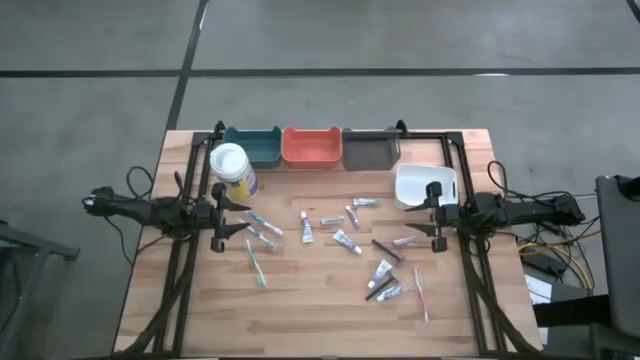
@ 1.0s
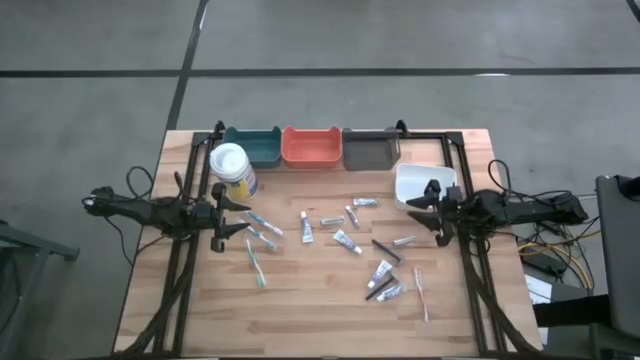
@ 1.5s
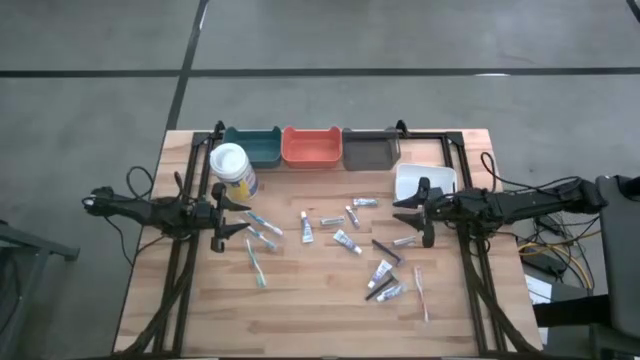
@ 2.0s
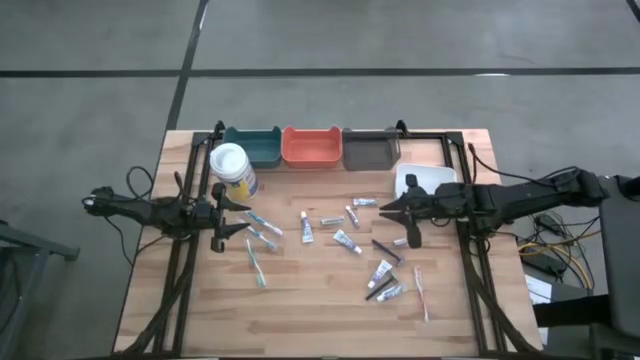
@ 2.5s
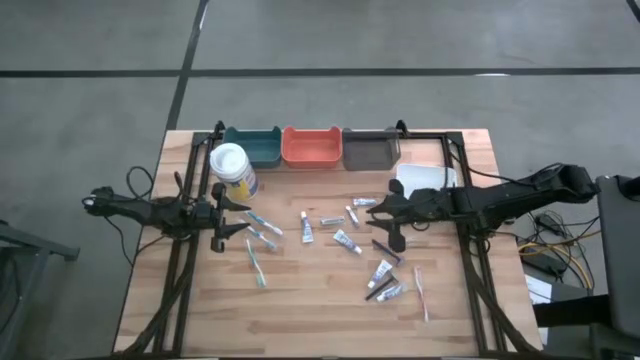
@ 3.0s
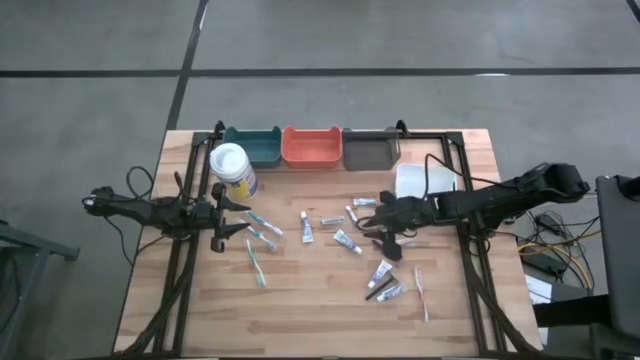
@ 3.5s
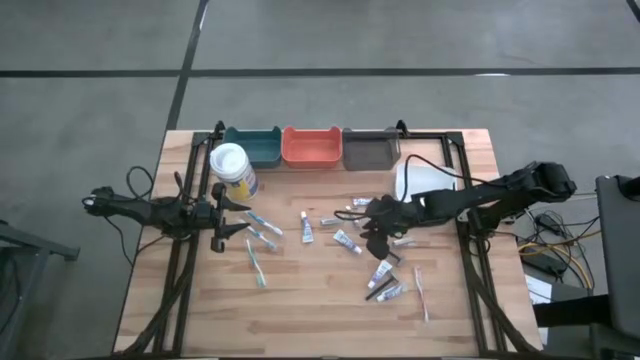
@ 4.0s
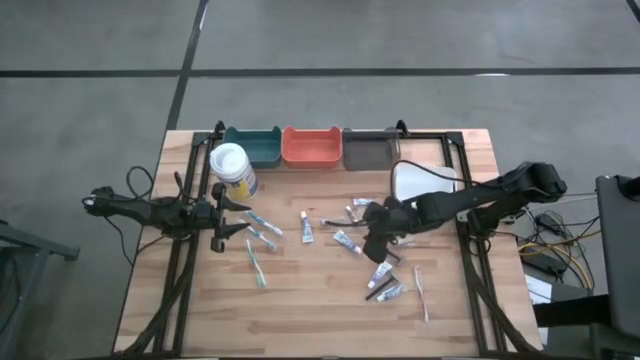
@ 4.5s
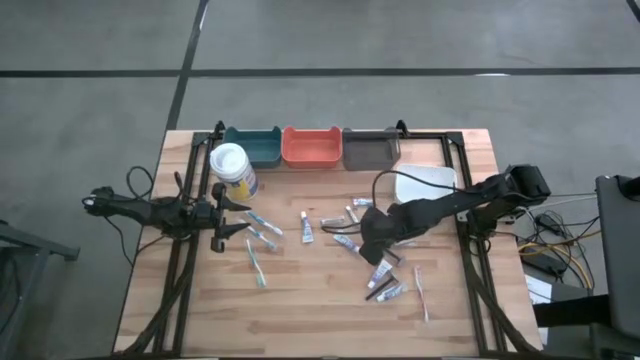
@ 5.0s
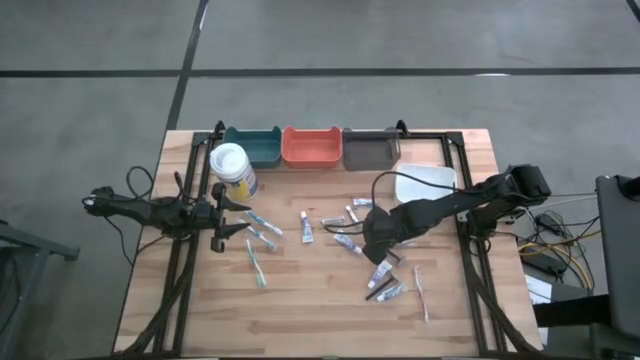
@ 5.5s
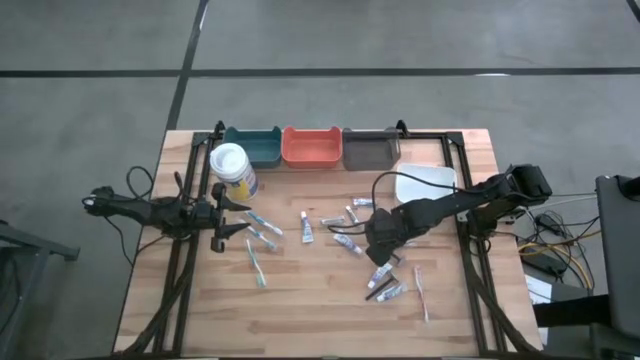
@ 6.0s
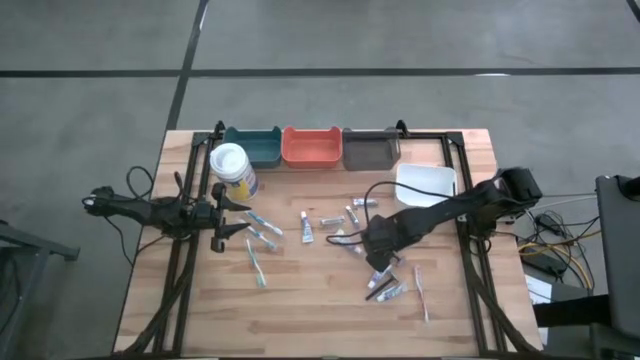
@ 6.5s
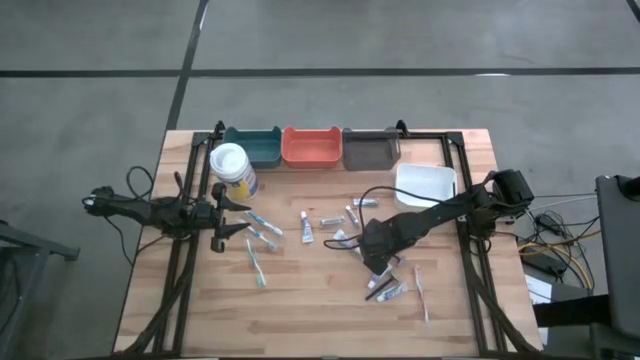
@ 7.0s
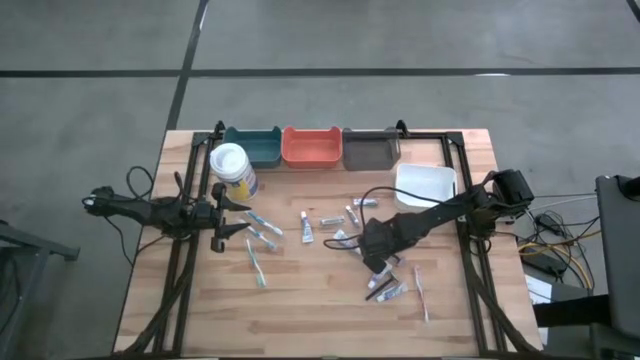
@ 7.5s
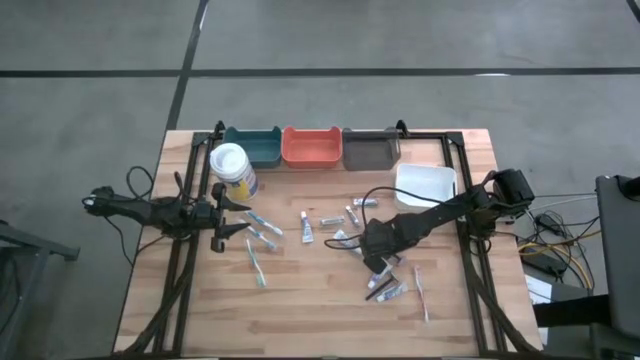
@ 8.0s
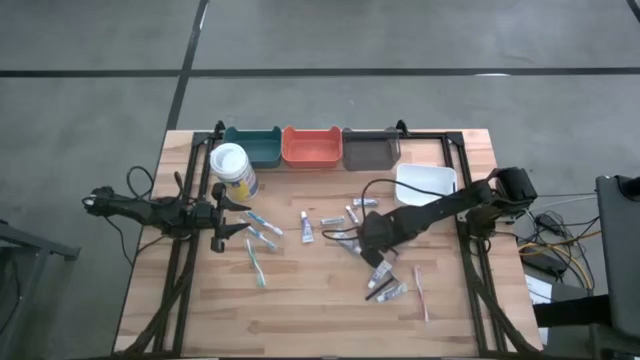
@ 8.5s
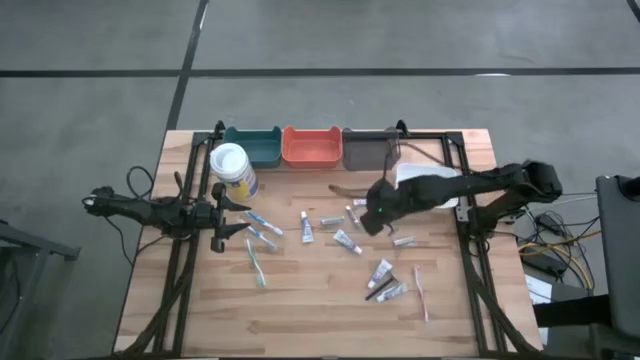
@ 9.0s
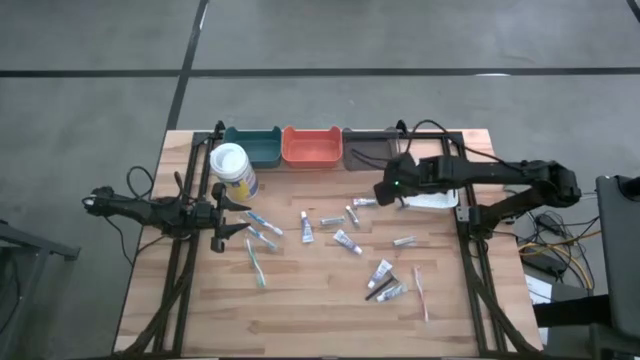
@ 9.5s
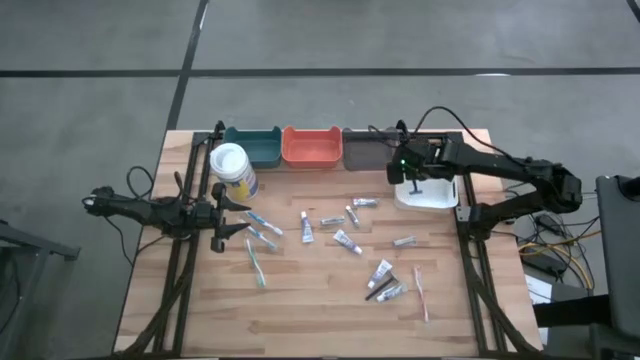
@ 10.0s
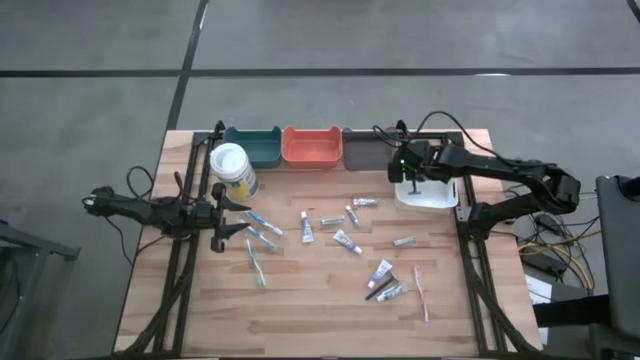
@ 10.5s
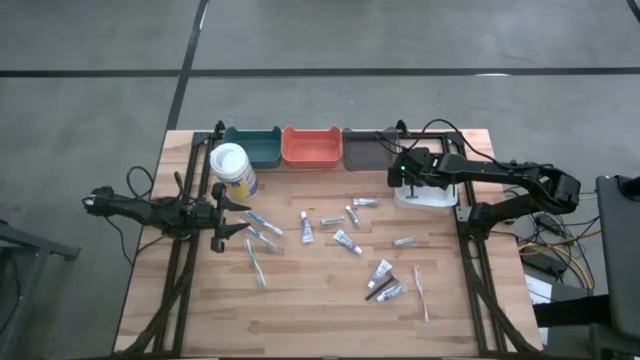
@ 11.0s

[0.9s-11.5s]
Task: Pick & Place Travel size toiletries
Put the top razor into the white bin

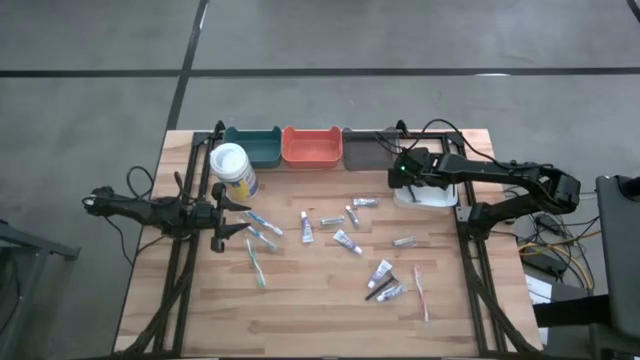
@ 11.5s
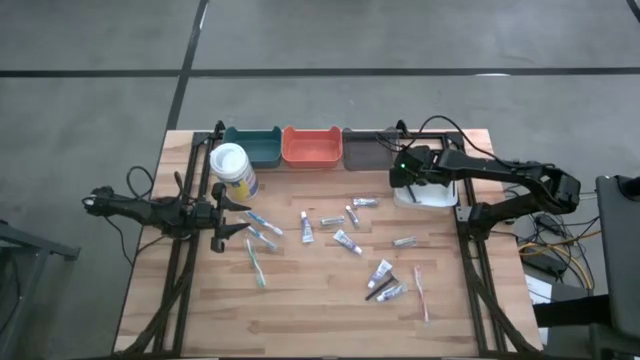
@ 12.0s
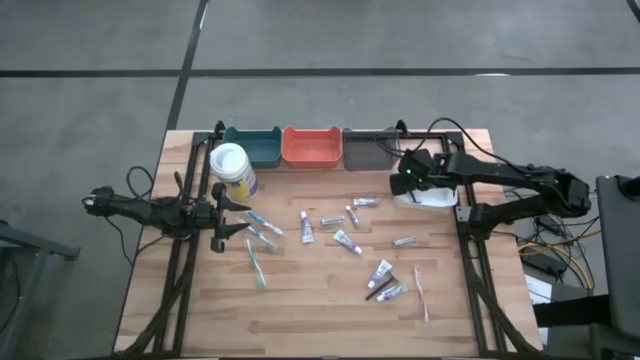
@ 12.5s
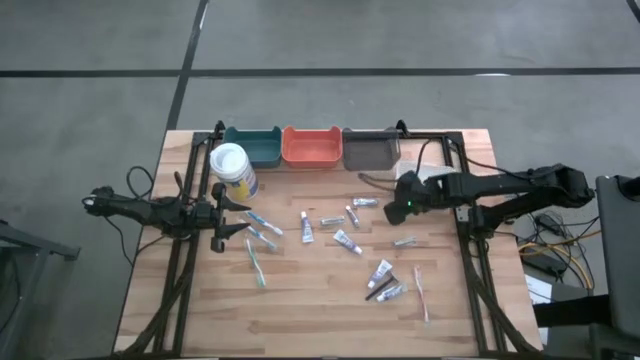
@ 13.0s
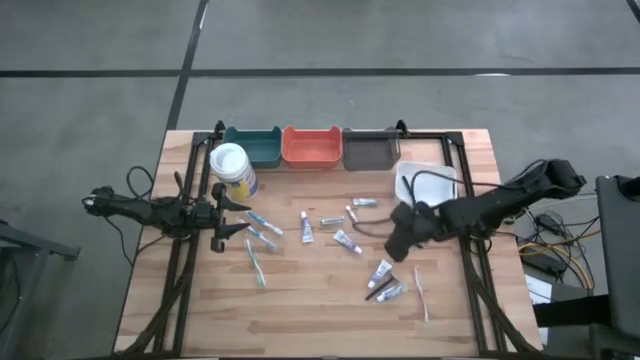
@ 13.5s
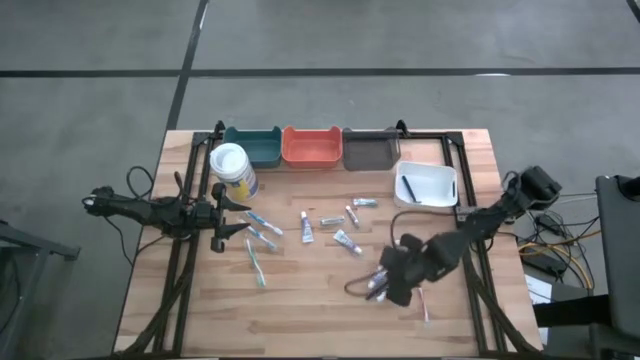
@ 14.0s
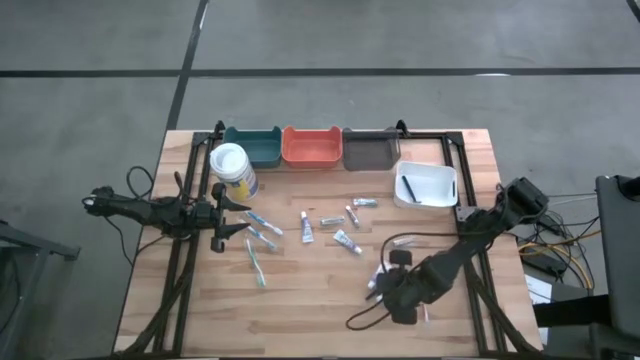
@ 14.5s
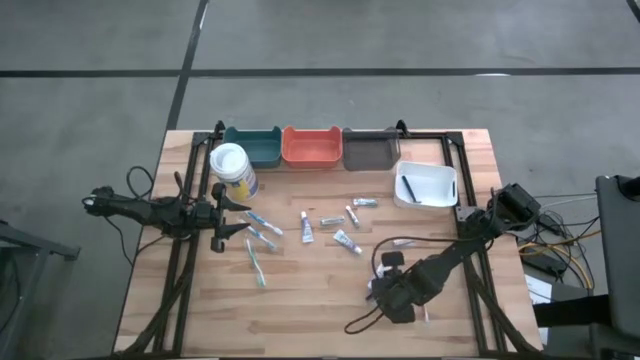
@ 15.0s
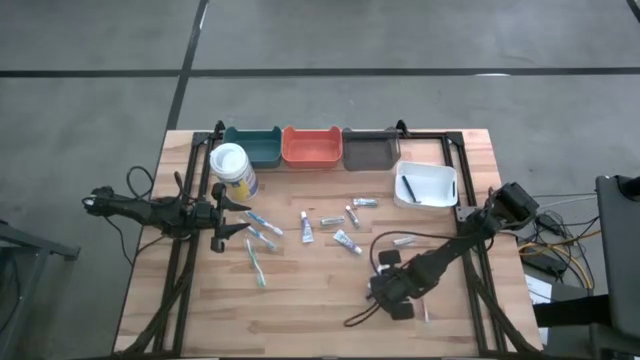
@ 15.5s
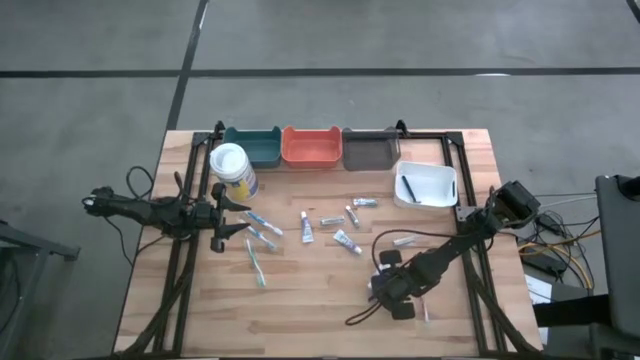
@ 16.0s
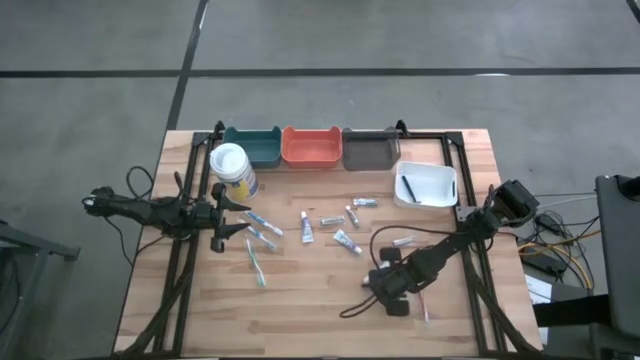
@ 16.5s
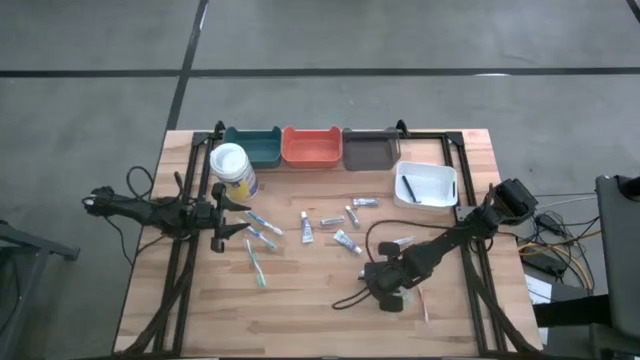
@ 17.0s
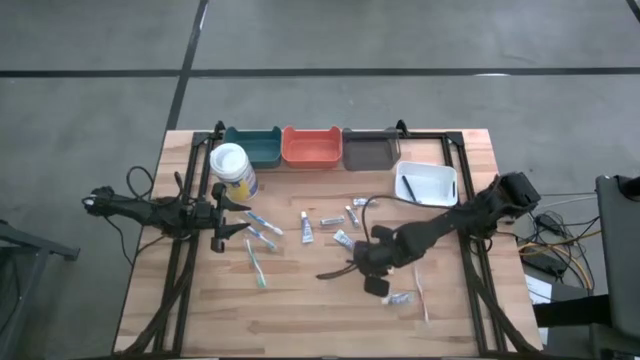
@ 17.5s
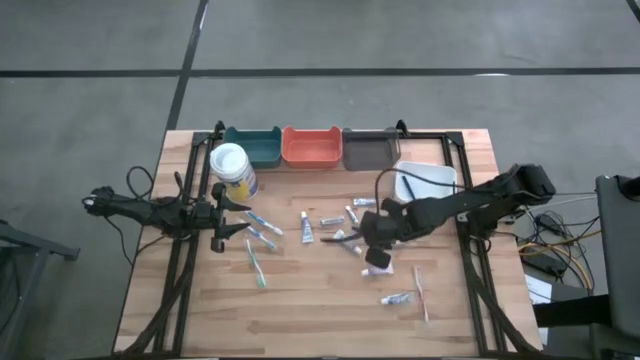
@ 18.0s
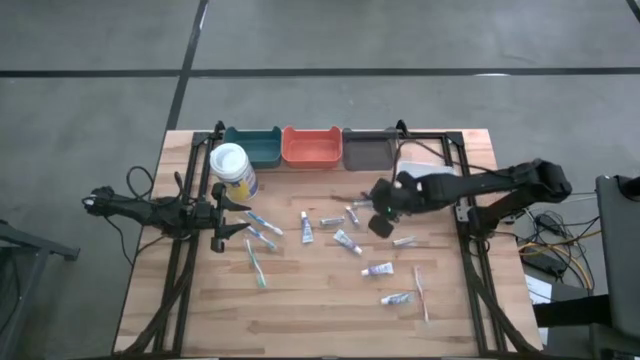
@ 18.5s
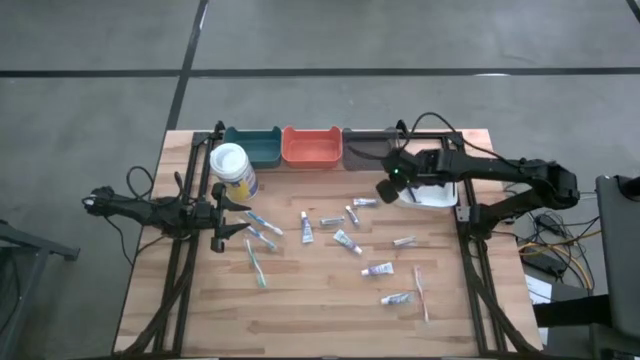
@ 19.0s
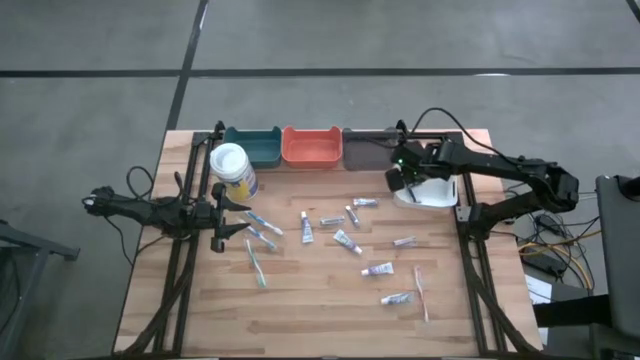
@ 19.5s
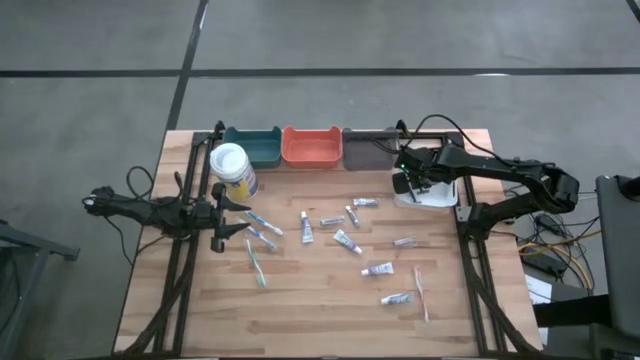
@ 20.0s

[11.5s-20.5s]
Put the razor into the white bin

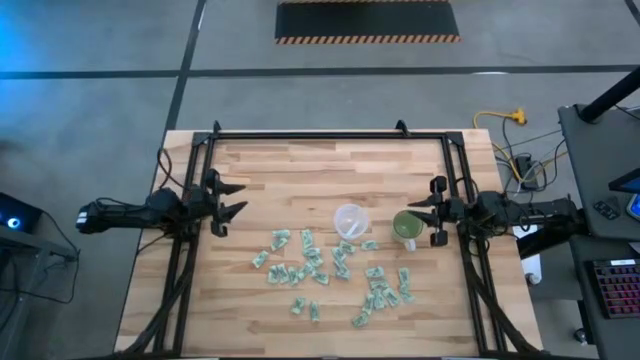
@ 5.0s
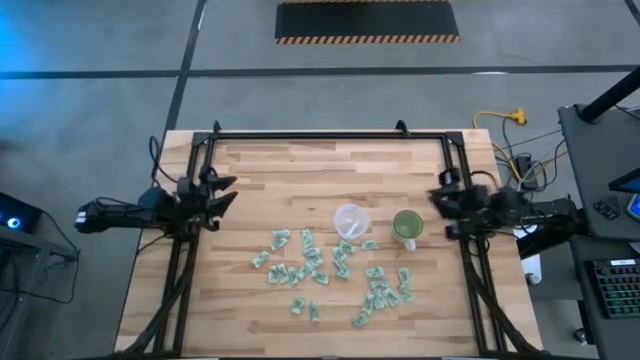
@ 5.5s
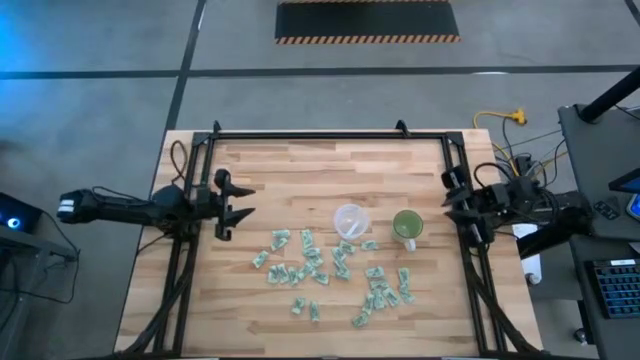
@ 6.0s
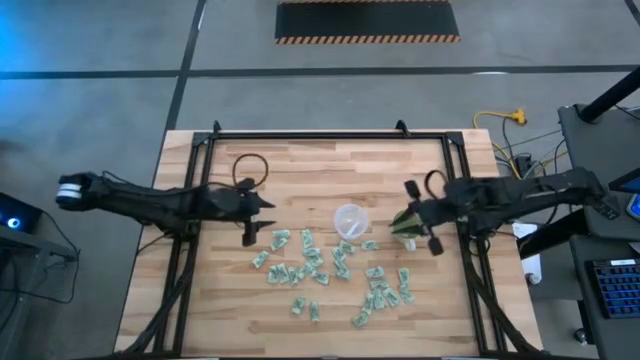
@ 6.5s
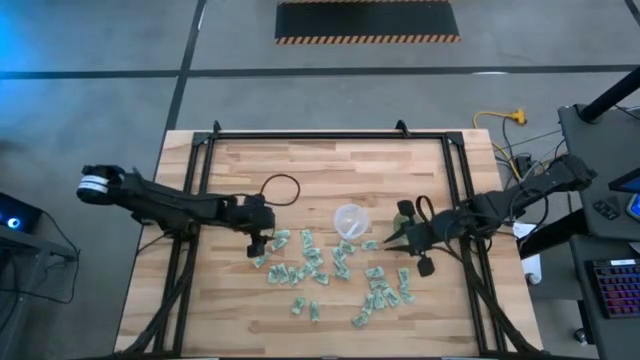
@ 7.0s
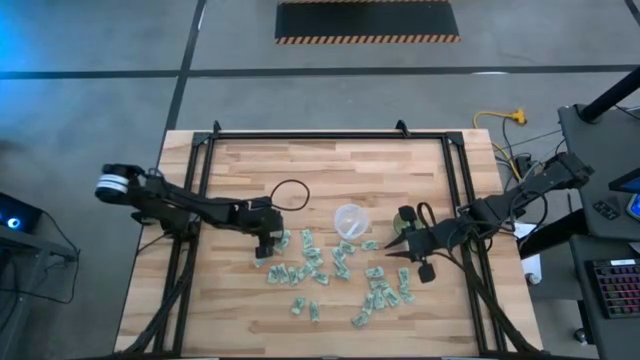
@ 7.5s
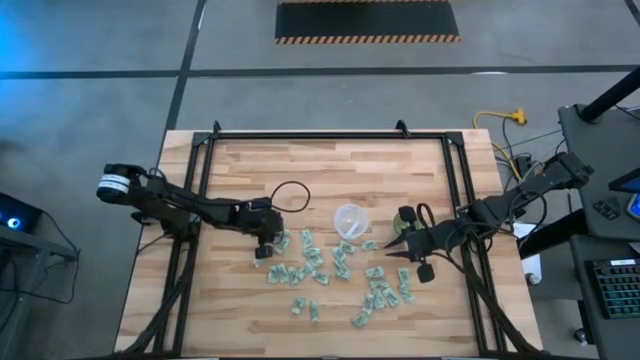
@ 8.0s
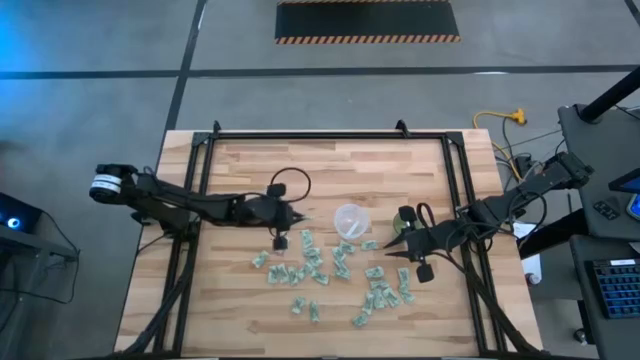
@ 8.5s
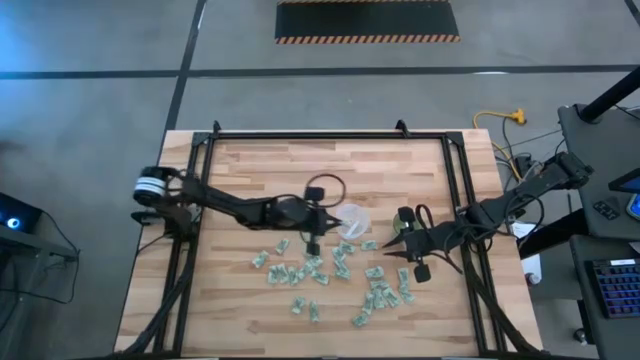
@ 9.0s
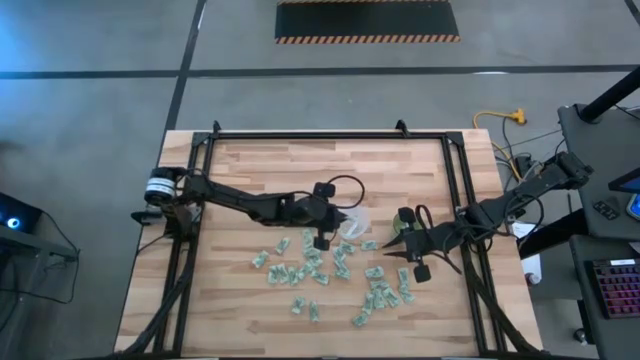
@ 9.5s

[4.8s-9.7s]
Task: Pick and place Stevia / Truvia into bins
Put the green stevia packet into the transparent container
